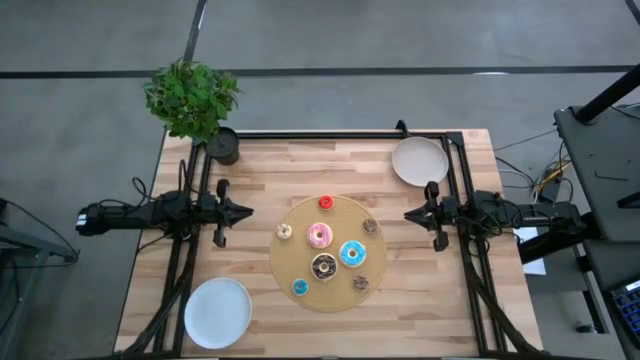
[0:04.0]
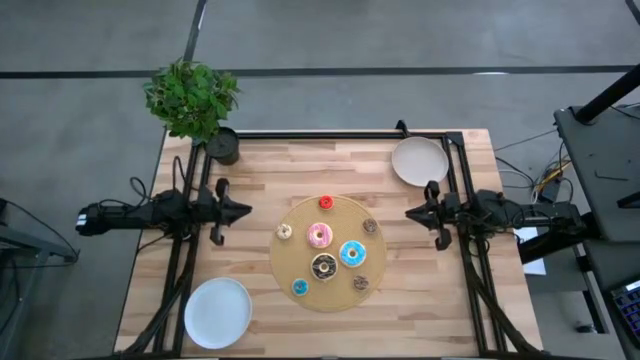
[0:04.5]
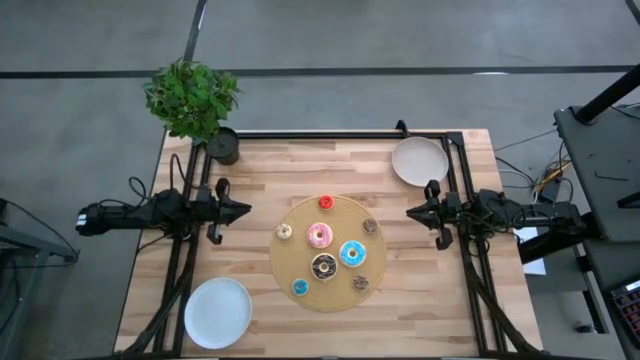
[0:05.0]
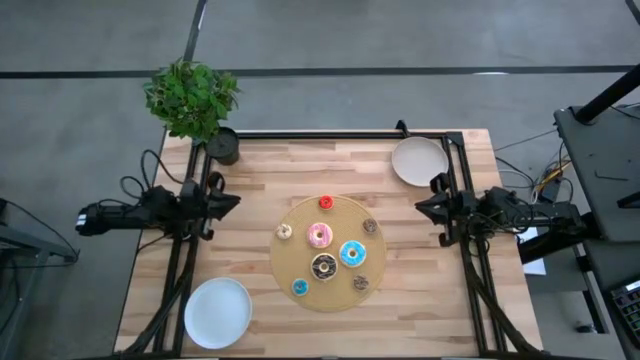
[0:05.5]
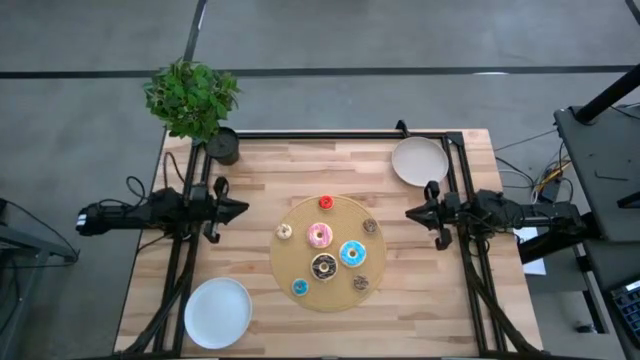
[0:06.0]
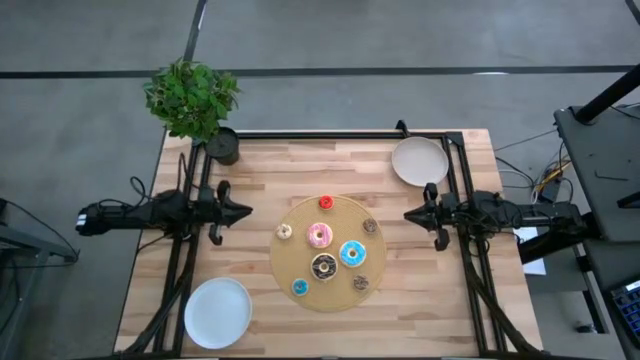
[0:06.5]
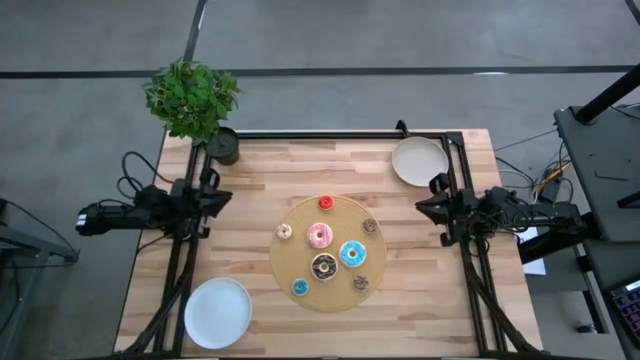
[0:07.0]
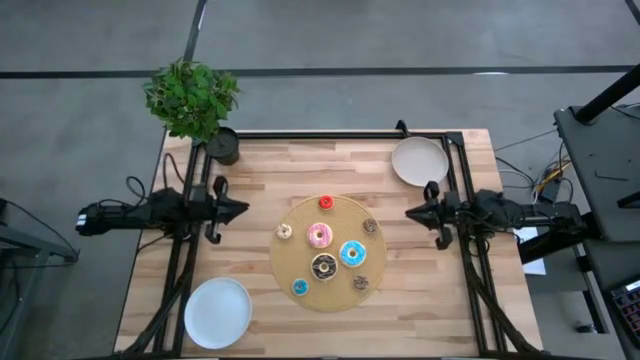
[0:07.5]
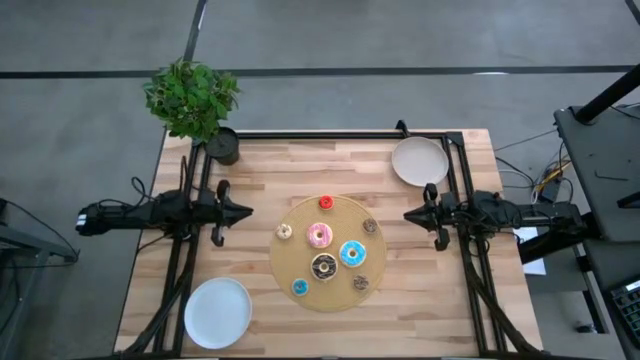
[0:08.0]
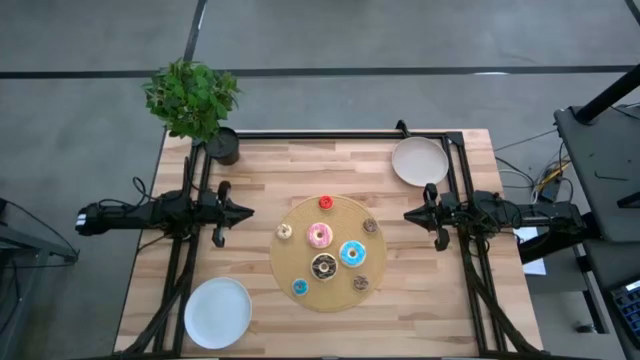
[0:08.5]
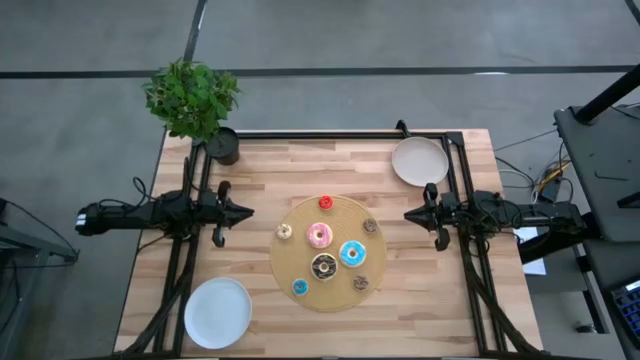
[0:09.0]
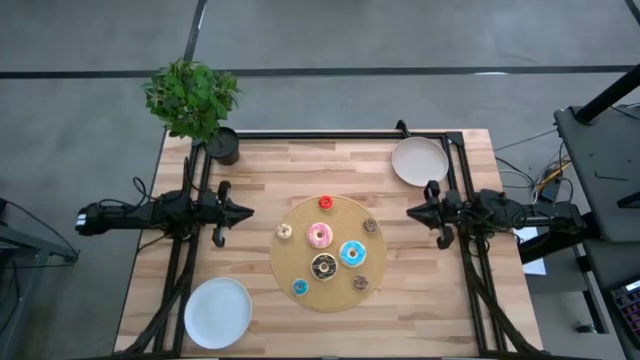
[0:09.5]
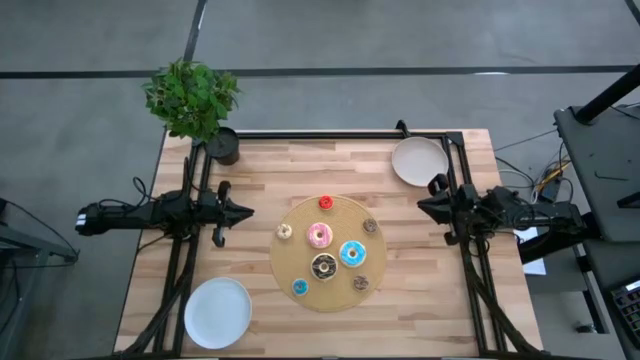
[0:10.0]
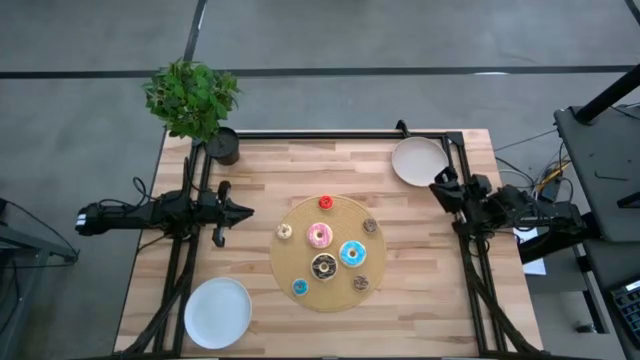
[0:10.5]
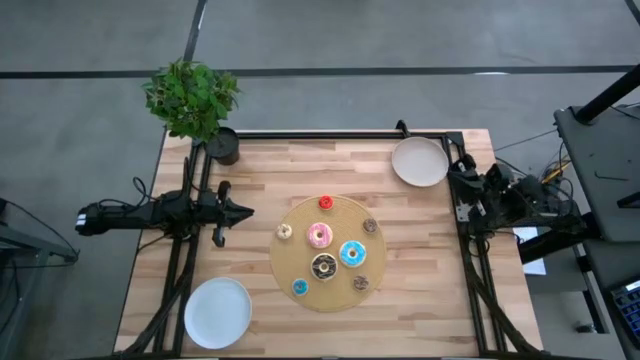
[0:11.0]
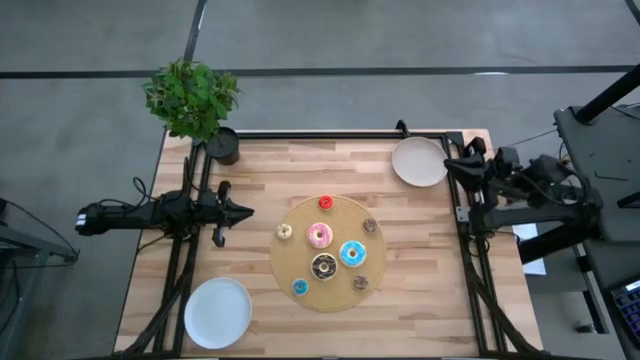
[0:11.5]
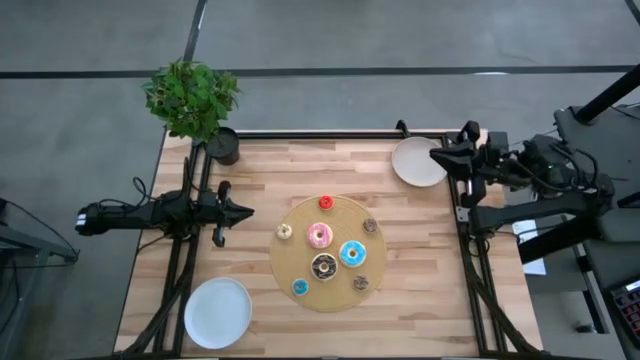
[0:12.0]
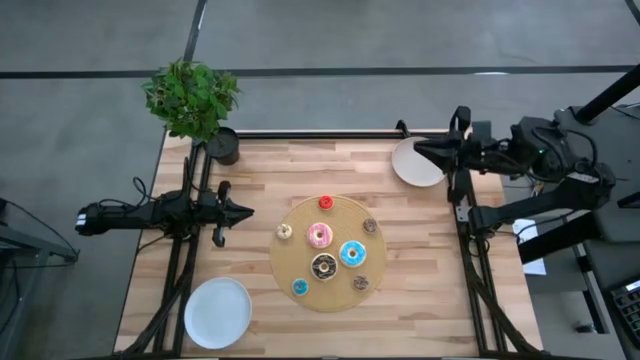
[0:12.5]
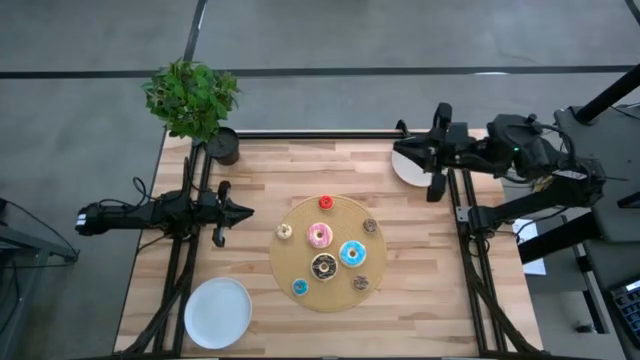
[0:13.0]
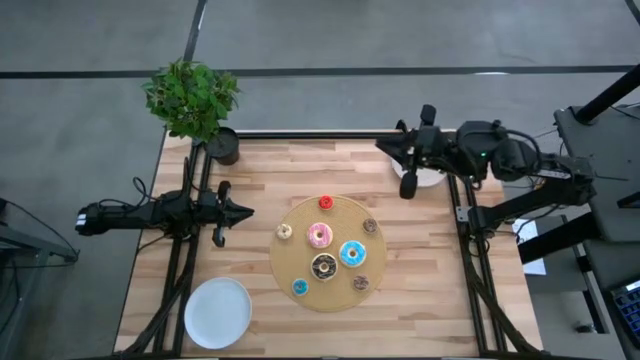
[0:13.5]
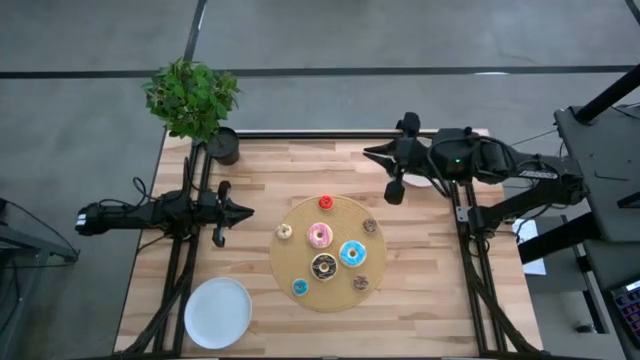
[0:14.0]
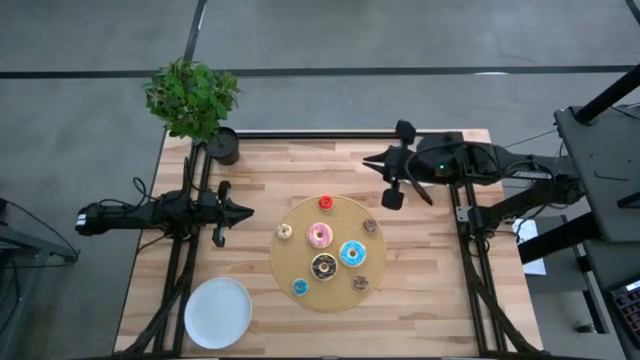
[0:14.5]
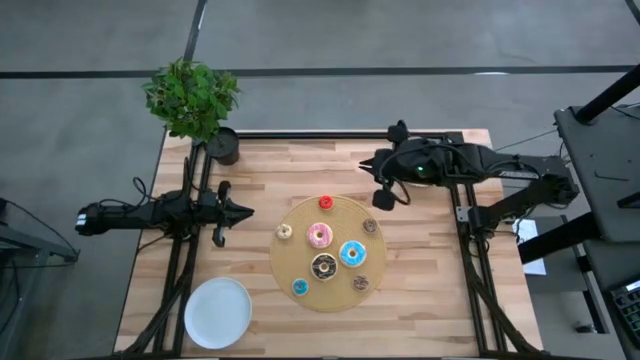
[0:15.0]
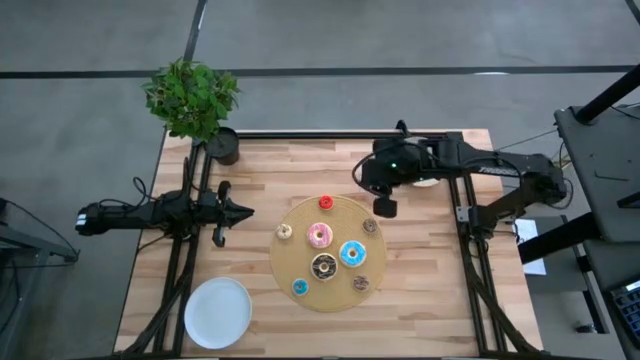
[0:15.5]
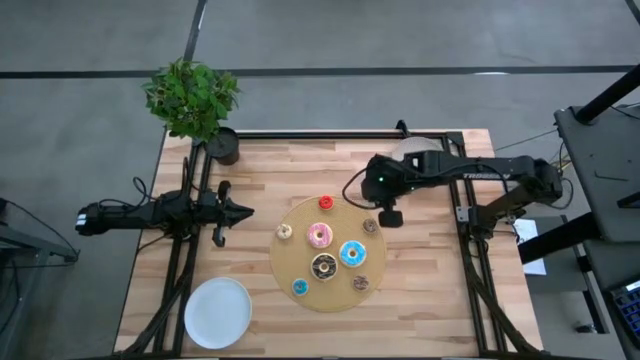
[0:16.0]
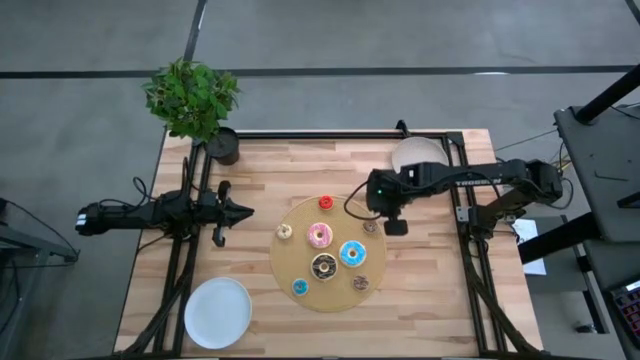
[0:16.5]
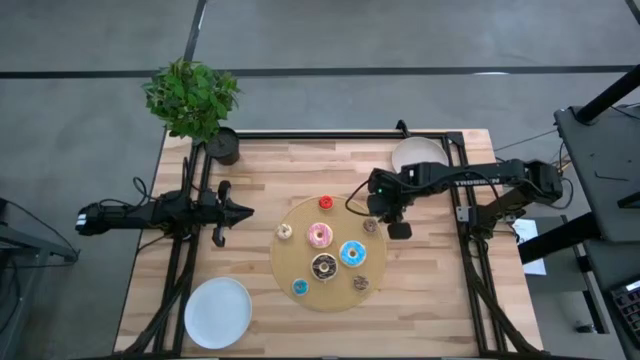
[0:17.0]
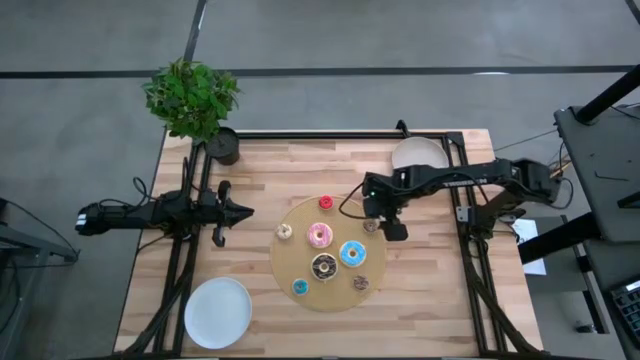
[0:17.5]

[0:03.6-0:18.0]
Task: Pick & Place donuts
Put the small brown donut on the gray plate

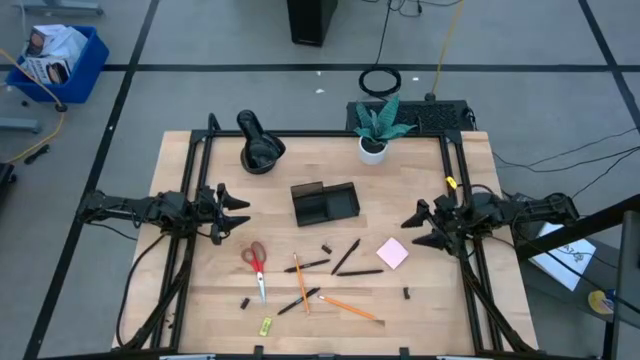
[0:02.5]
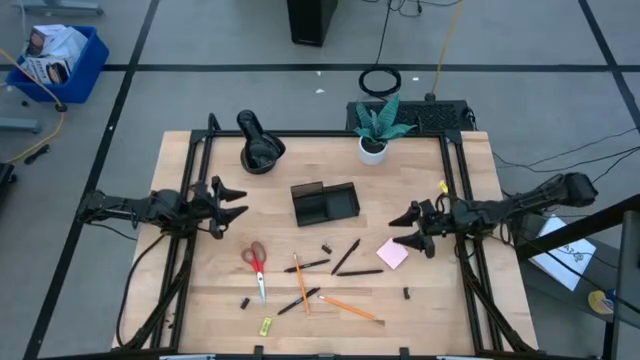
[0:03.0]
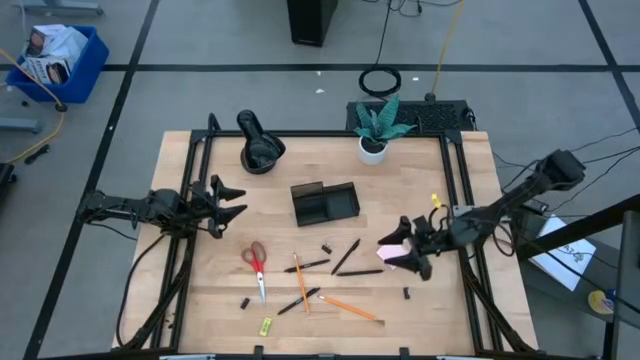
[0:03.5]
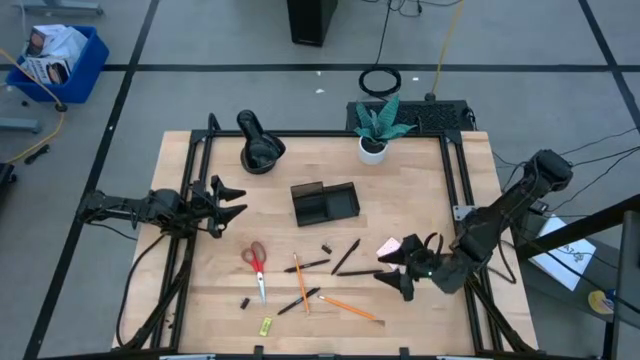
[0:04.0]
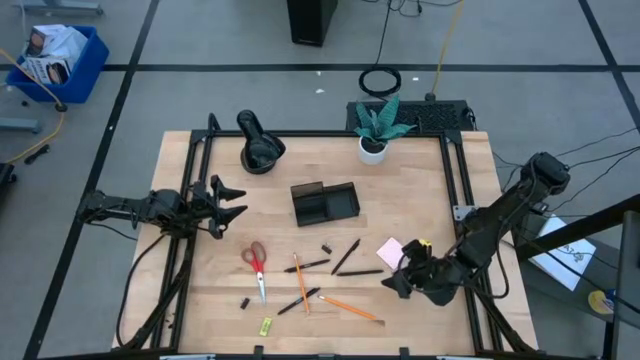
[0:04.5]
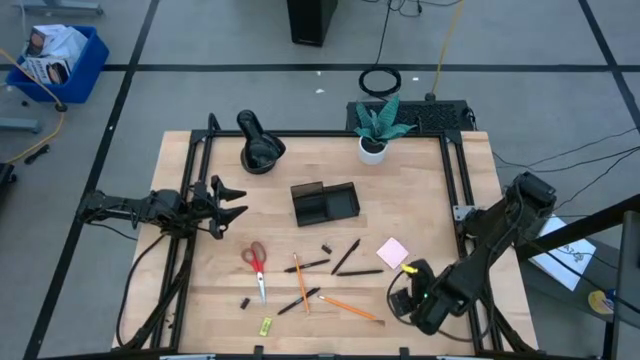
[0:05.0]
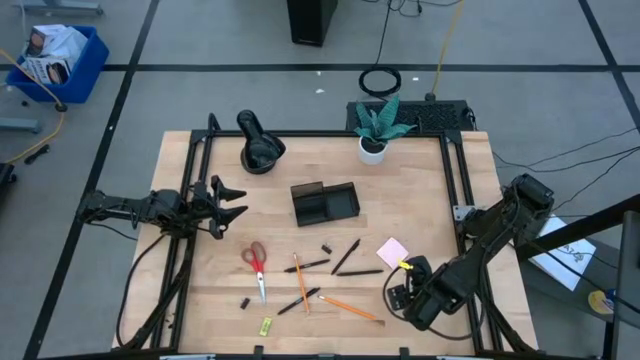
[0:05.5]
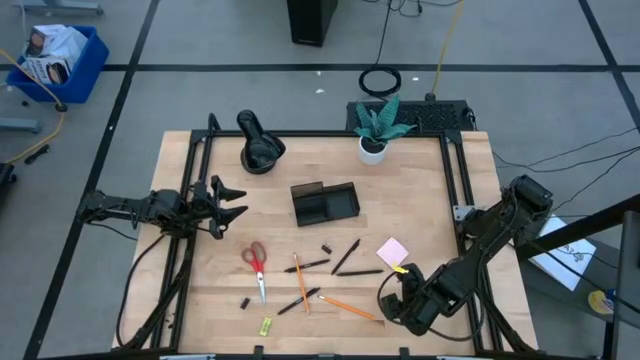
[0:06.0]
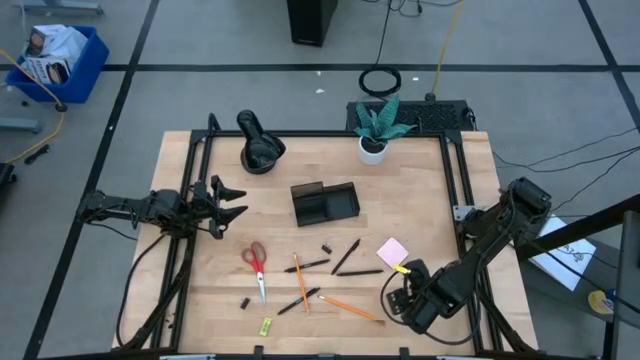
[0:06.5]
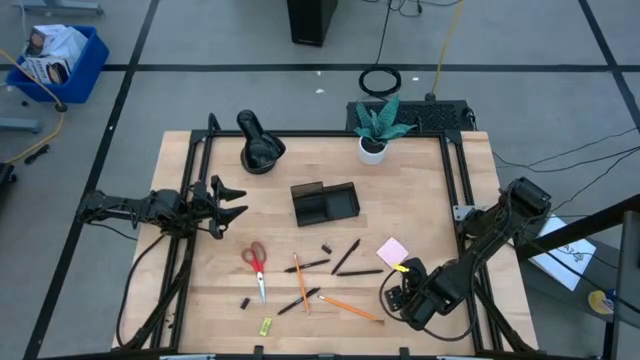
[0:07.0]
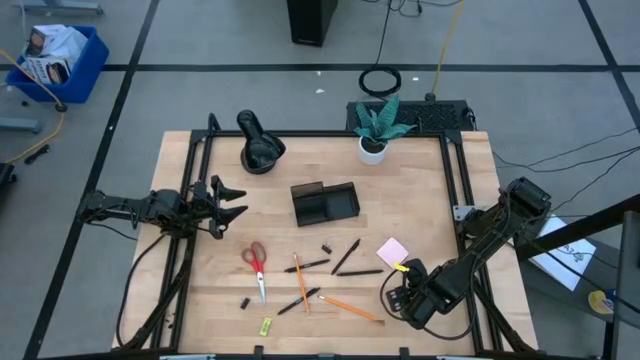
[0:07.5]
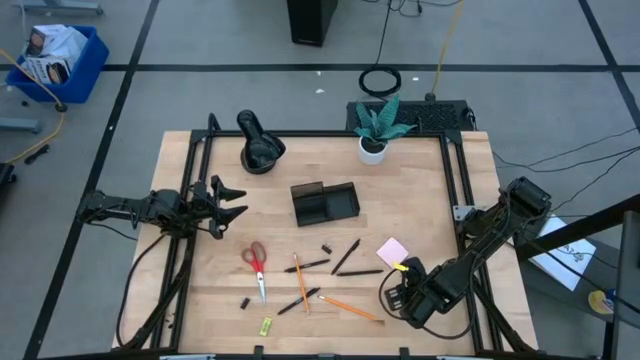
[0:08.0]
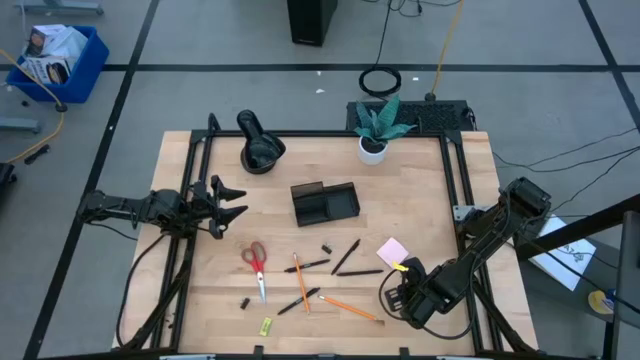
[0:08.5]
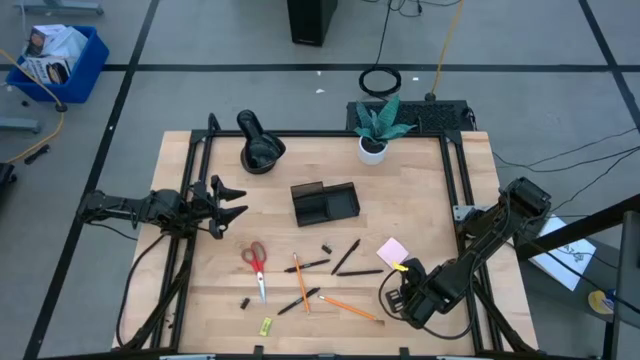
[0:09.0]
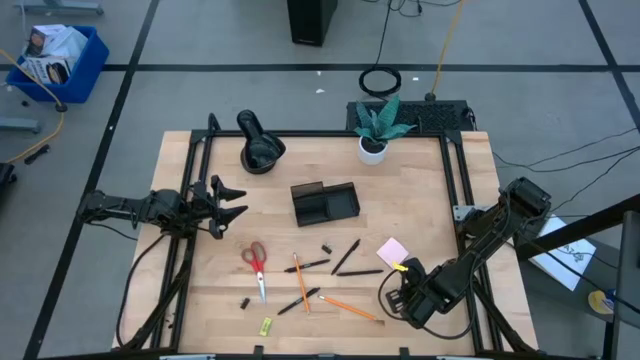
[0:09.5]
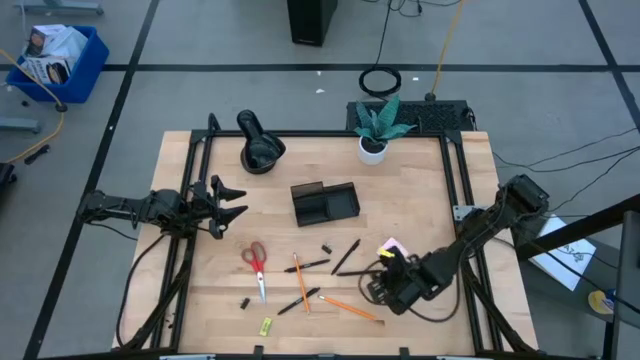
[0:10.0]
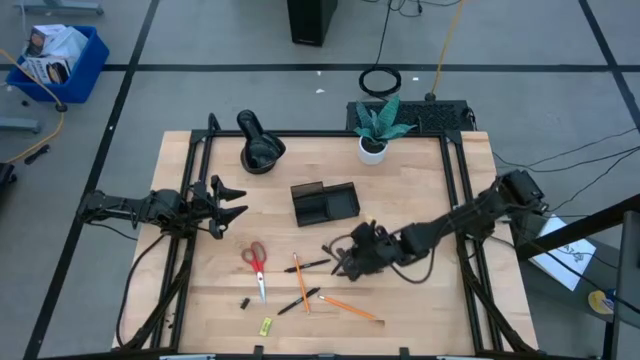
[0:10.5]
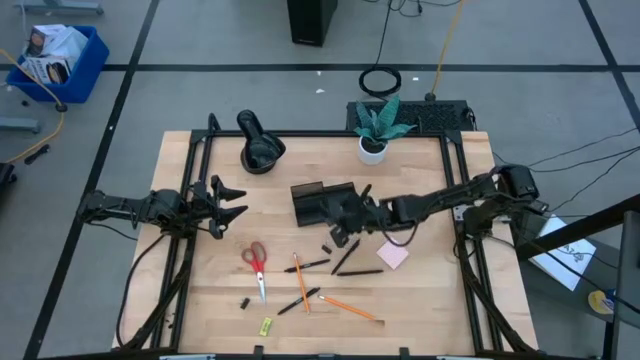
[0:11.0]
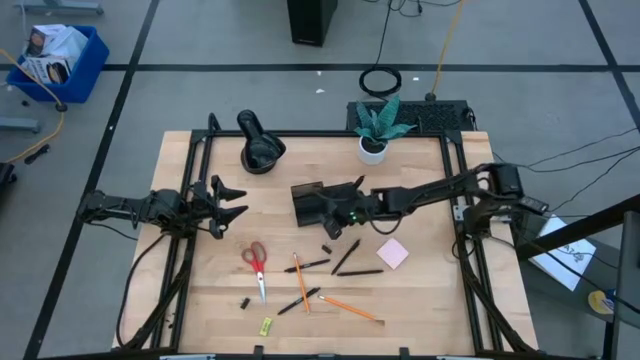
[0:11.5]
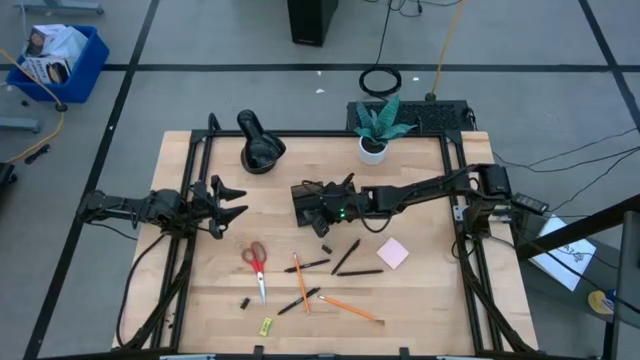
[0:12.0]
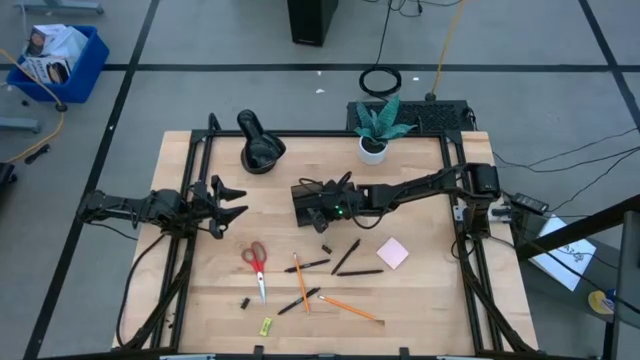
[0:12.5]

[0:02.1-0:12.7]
Task: Pick and place office supplies into organizer
Put the black binder clip into the desk organizer
